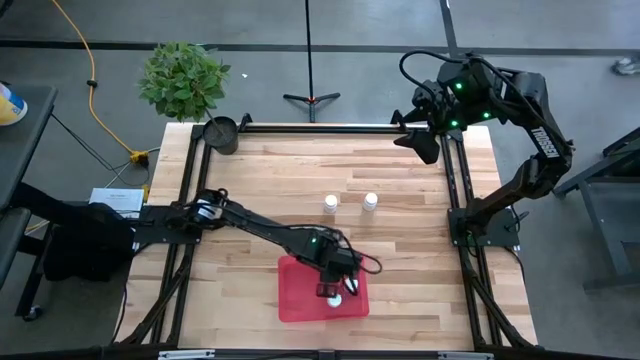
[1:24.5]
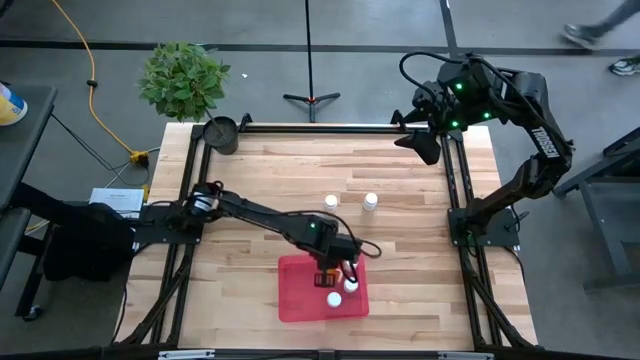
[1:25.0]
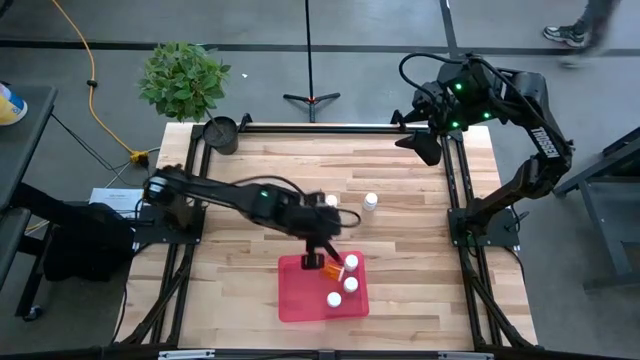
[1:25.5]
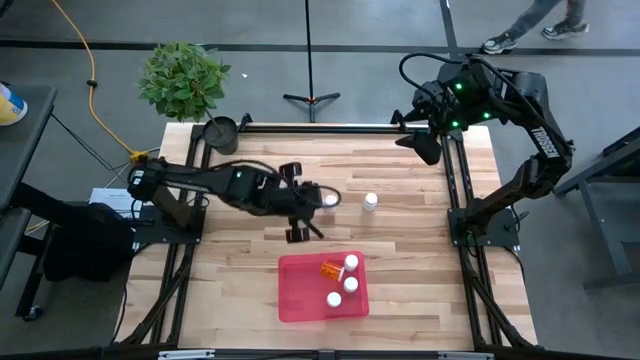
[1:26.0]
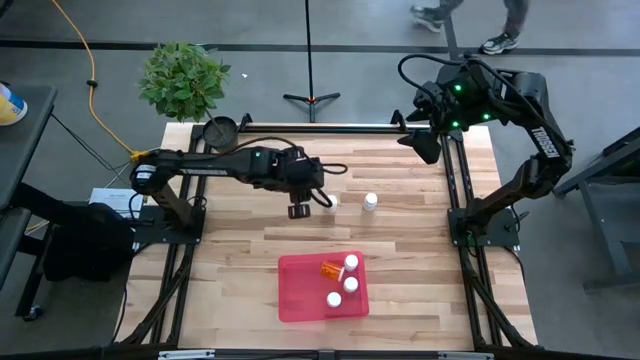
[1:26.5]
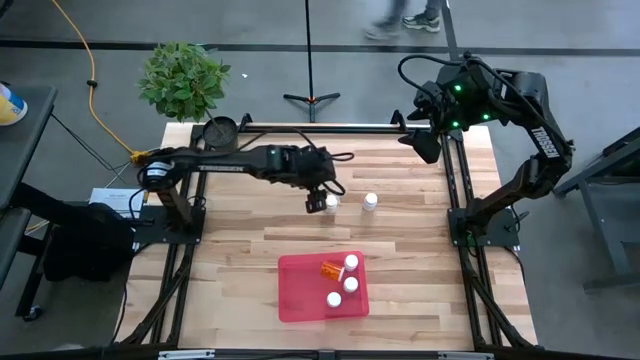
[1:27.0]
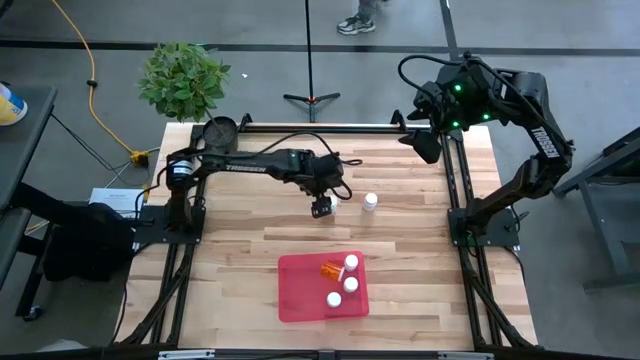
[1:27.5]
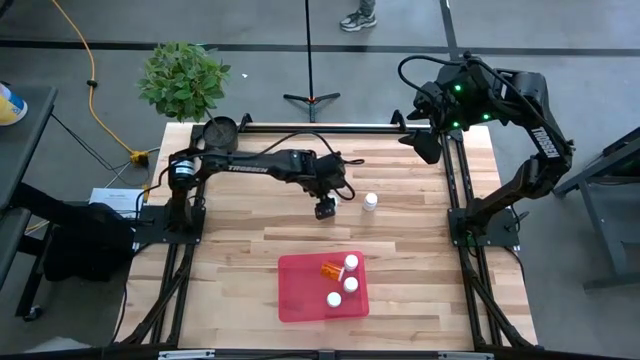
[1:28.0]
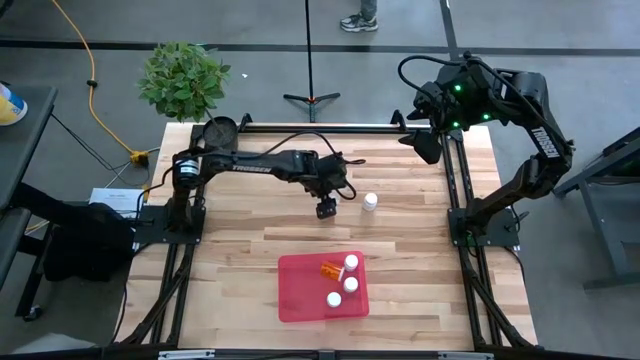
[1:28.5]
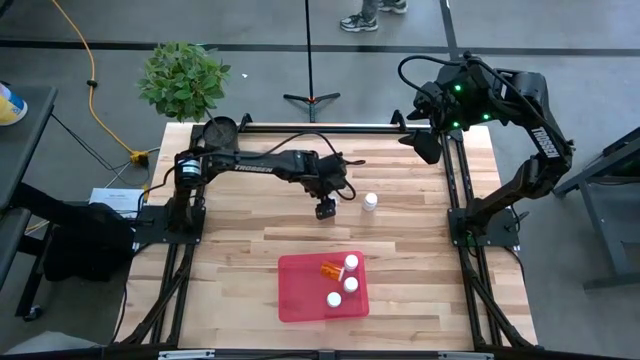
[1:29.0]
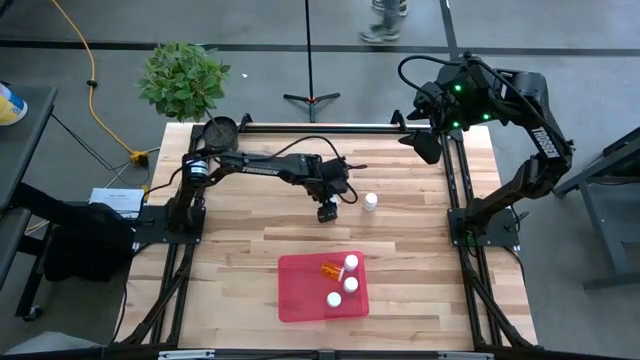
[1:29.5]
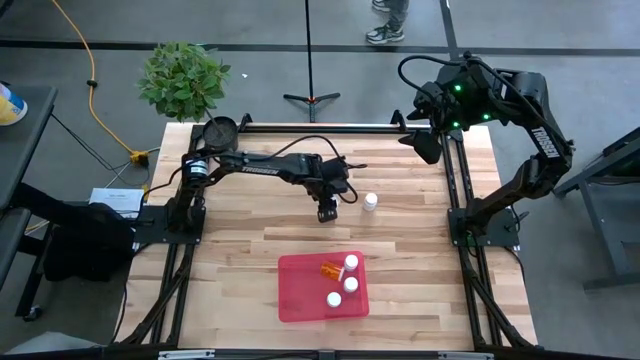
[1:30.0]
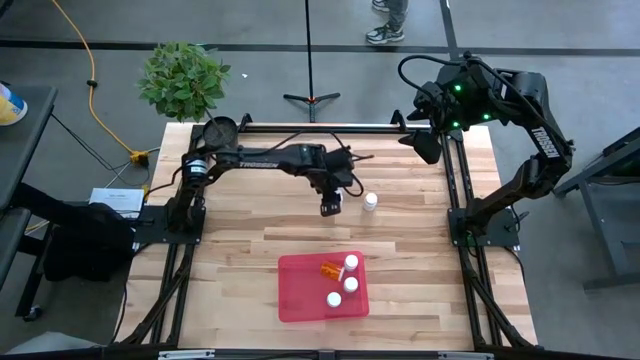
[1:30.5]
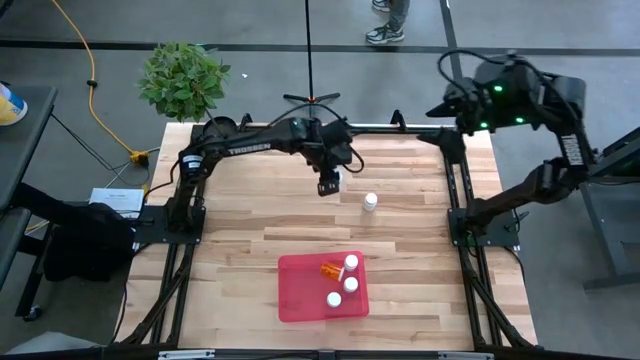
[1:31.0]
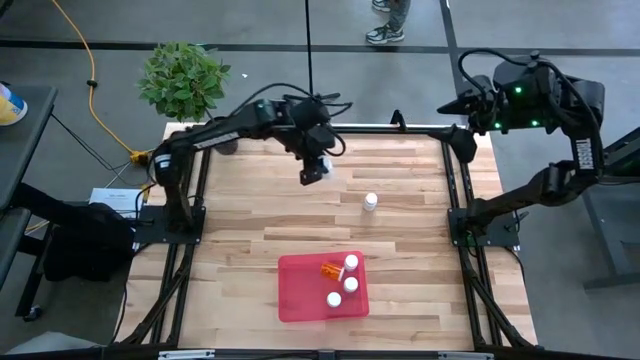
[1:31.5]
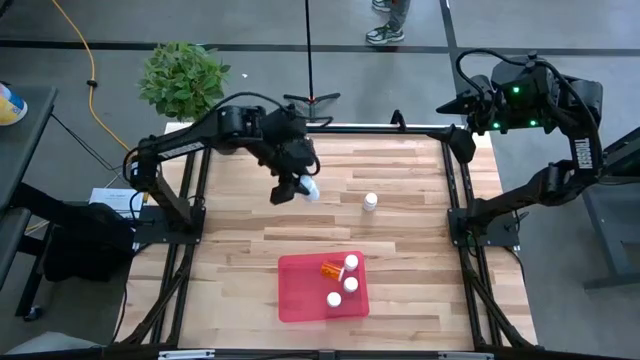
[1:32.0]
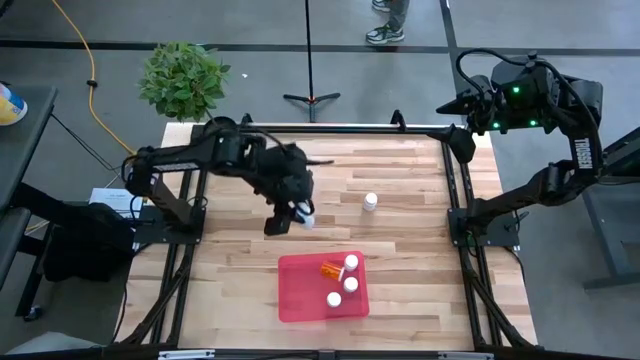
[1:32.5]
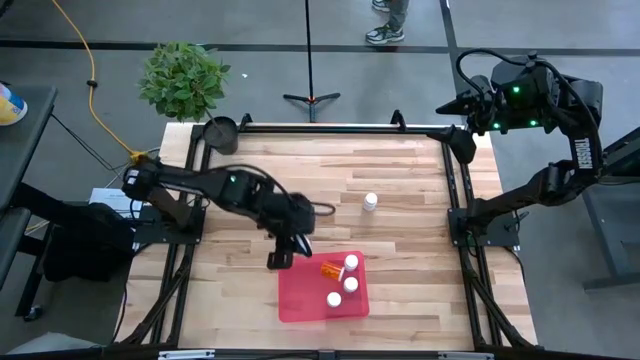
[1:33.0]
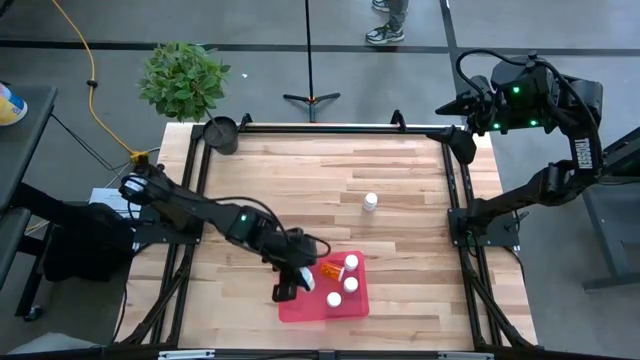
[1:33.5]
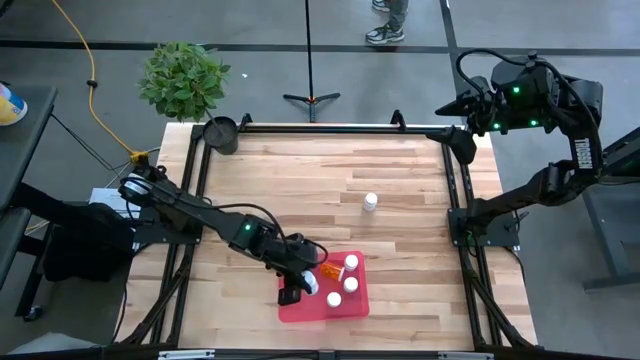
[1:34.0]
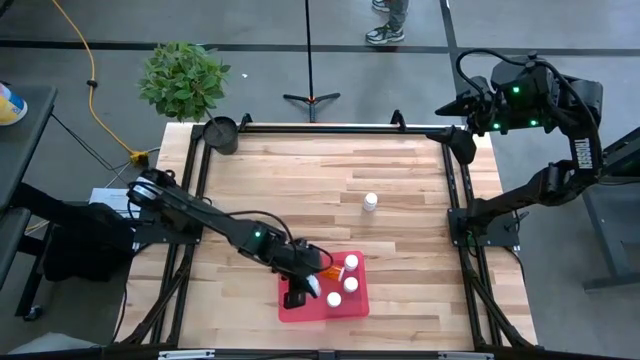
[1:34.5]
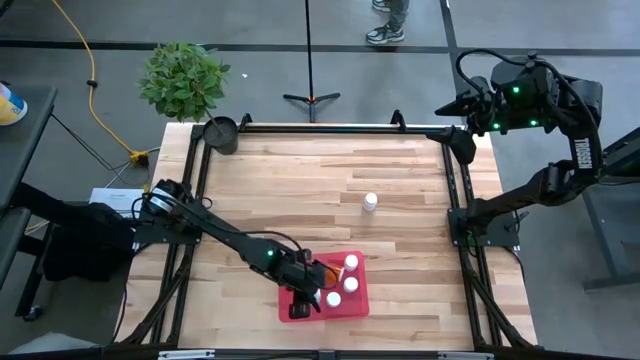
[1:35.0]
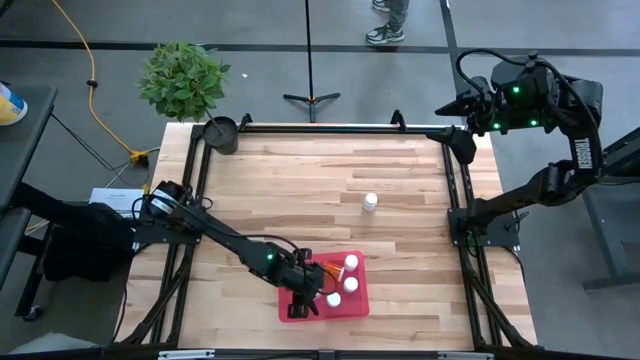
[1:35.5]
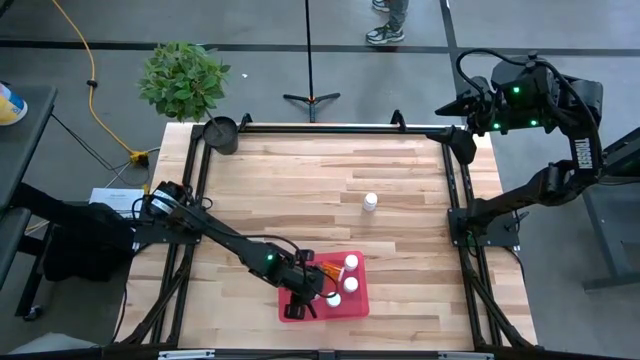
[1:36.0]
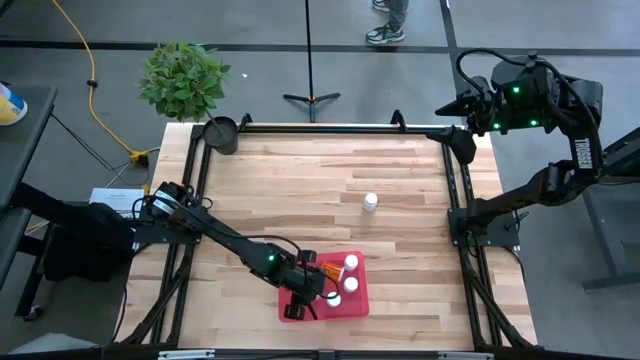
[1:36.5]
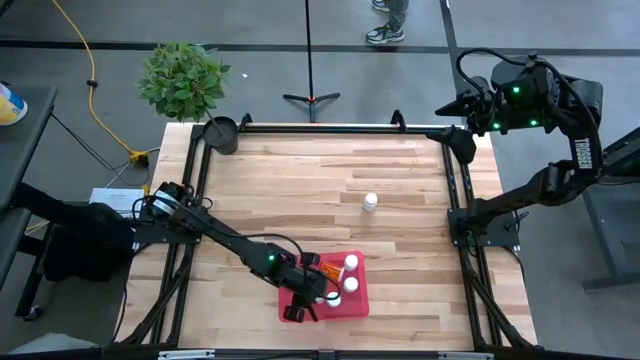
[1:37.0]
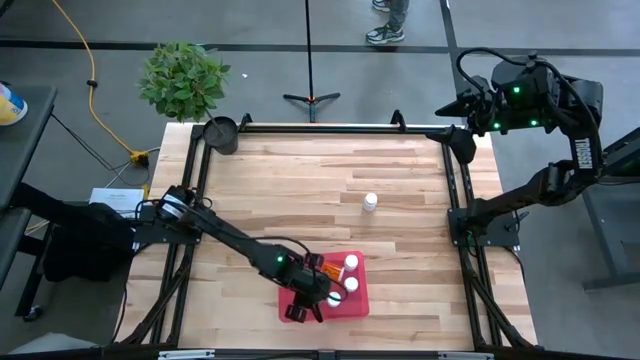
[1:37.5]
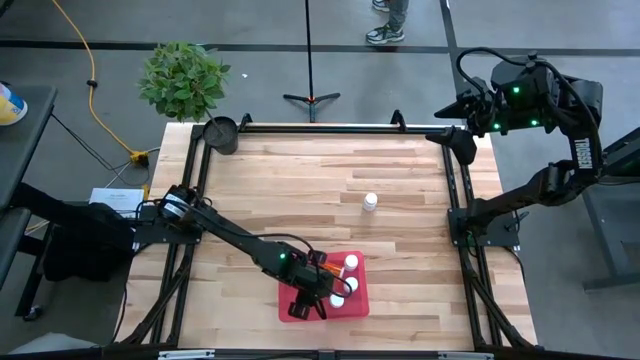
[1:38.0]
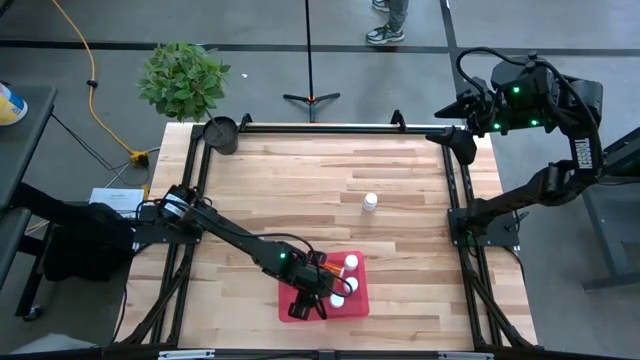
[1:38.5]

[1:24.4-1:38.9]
Task: Pick and place pill bottles into a basket
Put the white medicine bottle into the red container

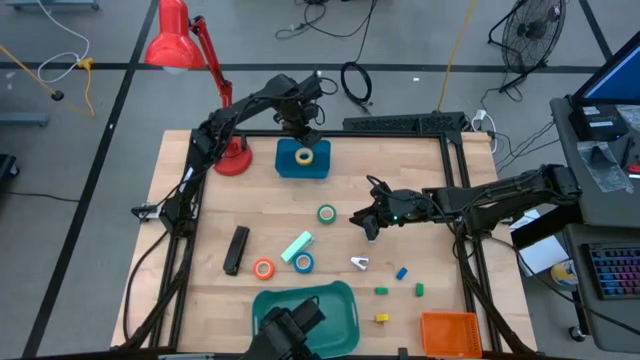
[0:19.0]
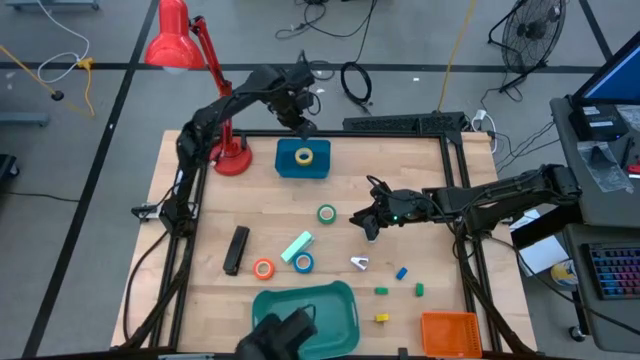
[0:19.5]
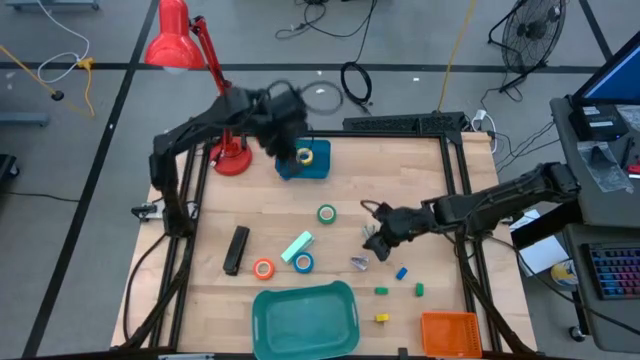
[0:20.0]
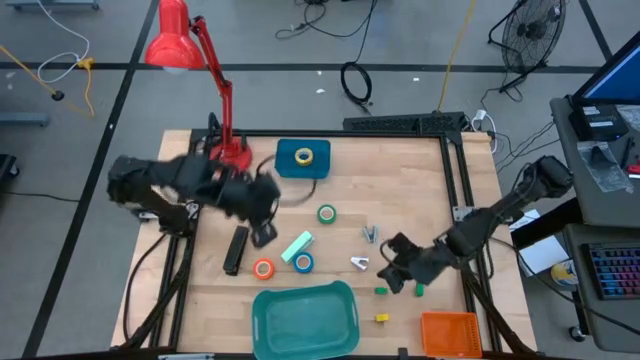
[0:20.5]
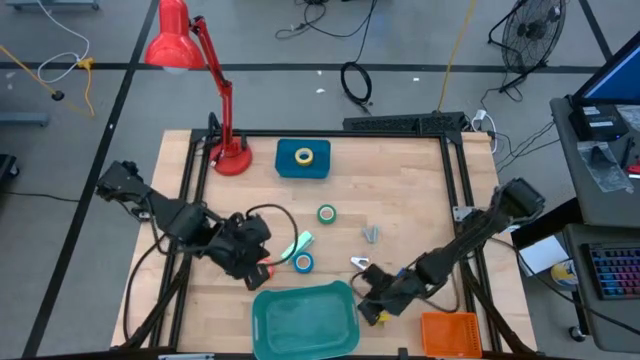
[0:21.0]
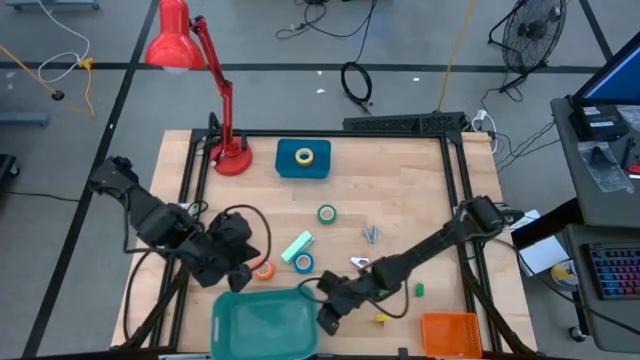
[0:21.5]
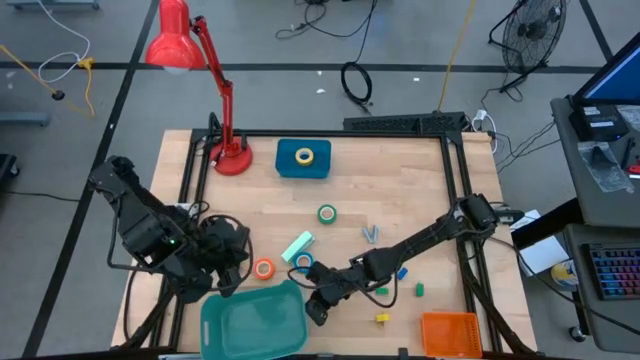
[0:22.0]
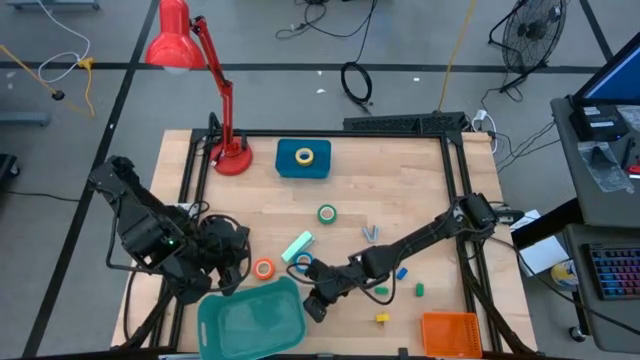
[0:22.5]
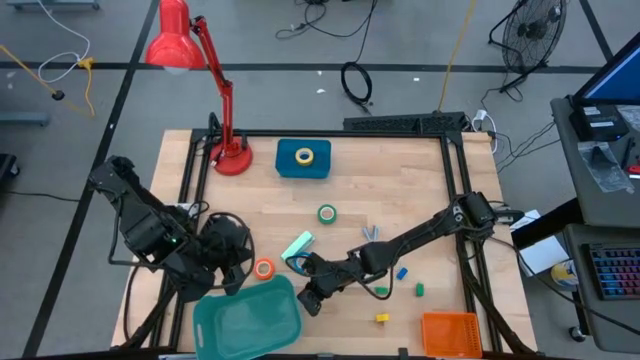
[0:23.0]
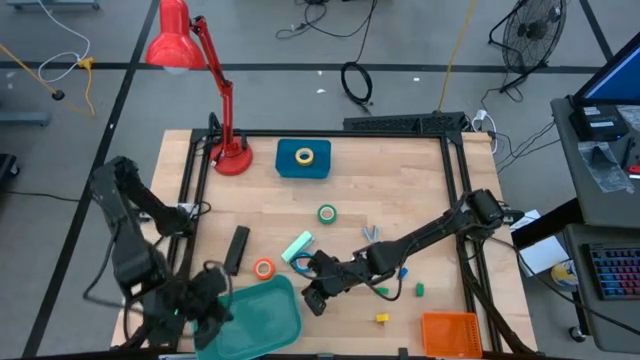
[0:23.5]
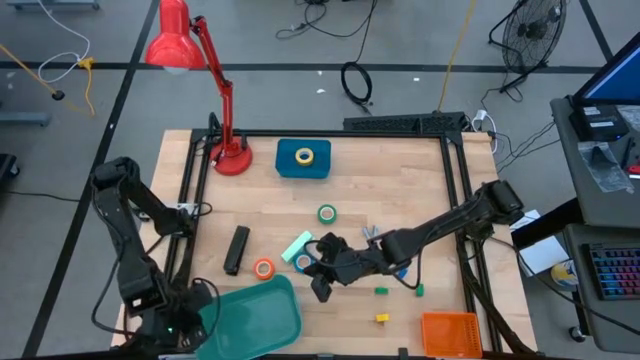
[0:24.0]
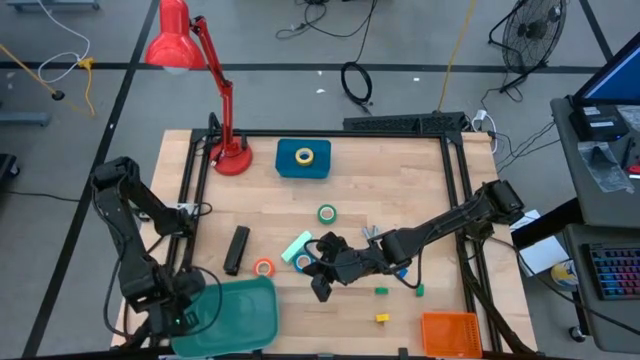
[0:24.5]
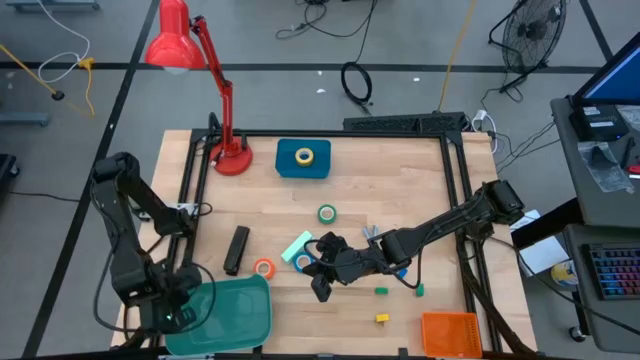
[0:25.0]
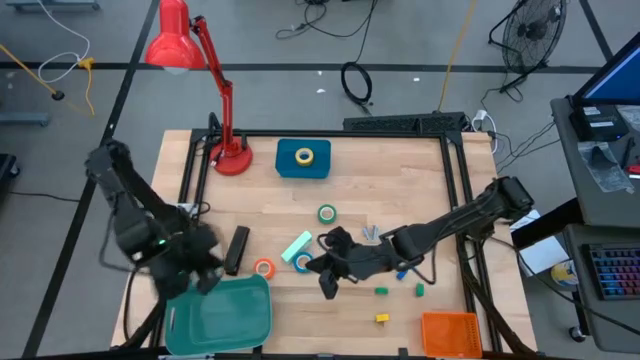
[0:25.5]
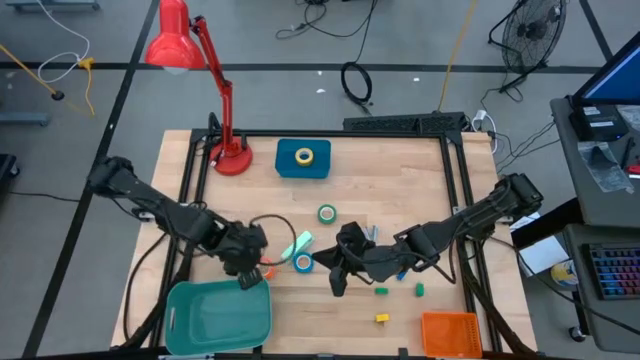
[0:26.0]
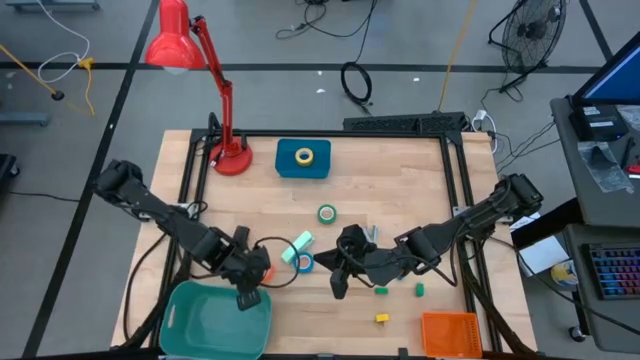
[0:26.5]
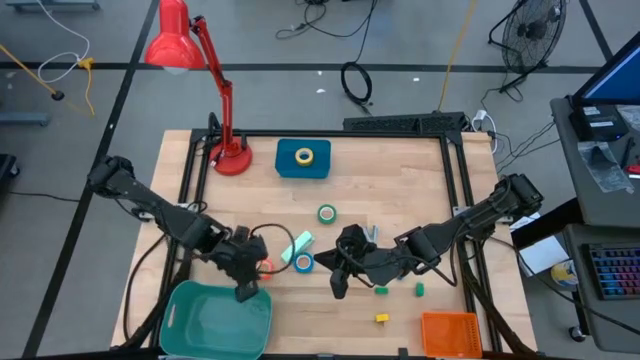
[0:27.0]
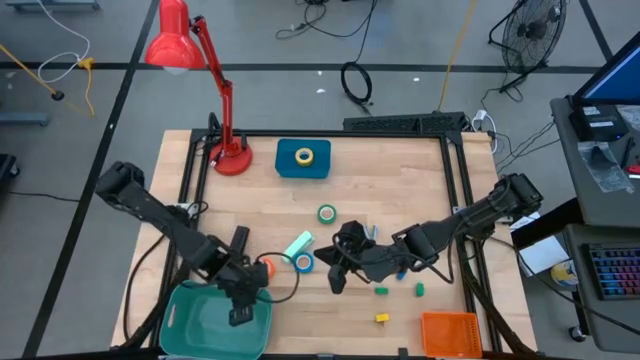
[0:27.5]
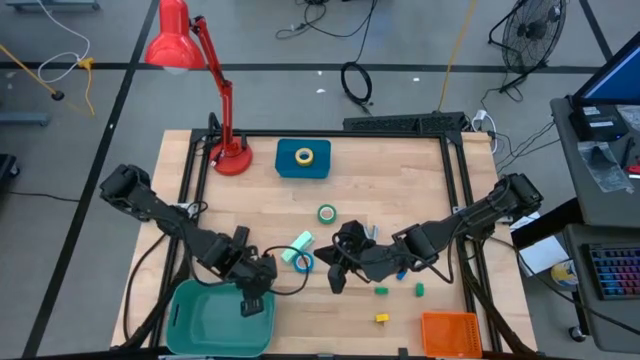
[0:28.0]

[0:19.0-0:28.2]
Task: Pick and place Stapler, Stapler remover, tape
Adjust the green bin
